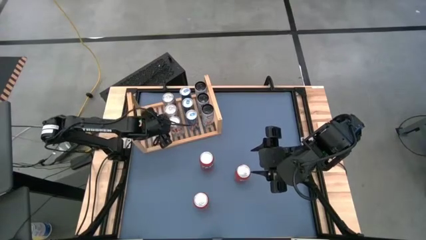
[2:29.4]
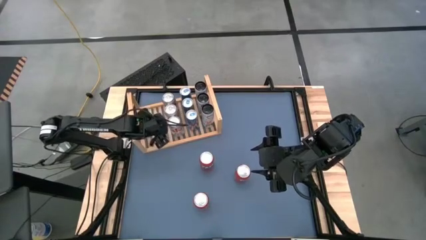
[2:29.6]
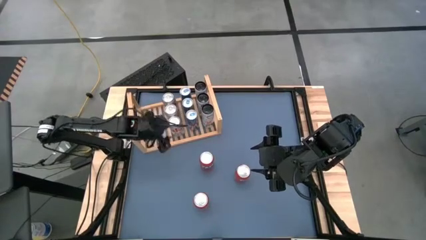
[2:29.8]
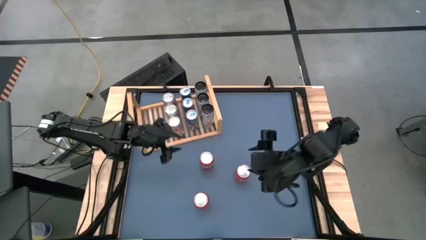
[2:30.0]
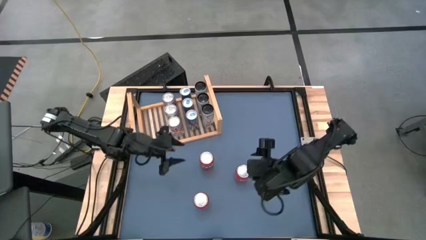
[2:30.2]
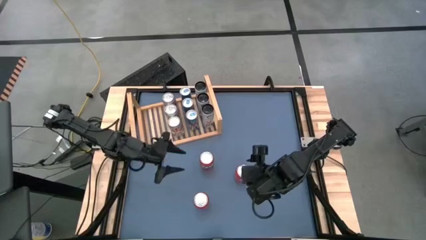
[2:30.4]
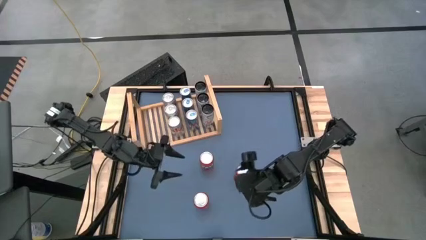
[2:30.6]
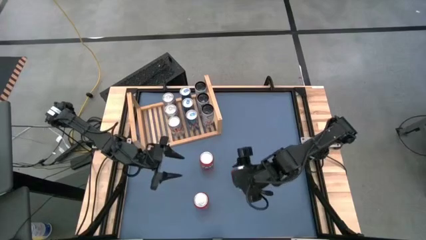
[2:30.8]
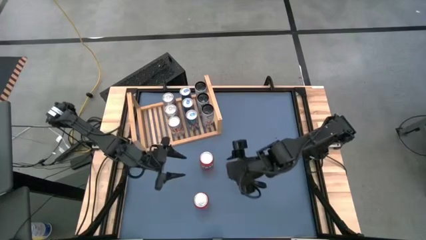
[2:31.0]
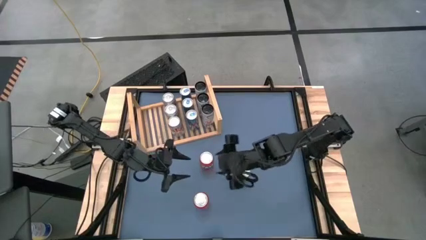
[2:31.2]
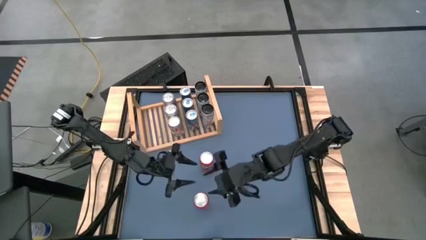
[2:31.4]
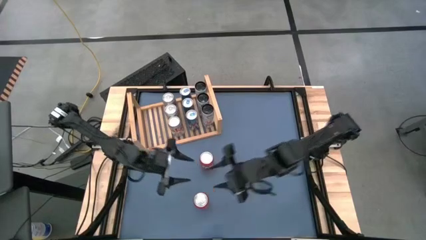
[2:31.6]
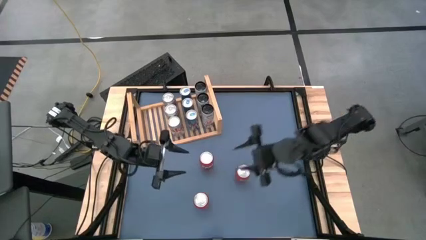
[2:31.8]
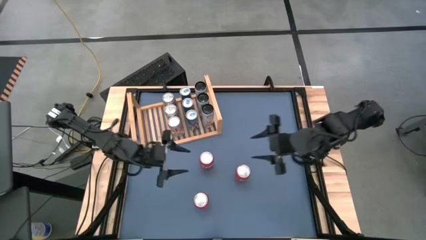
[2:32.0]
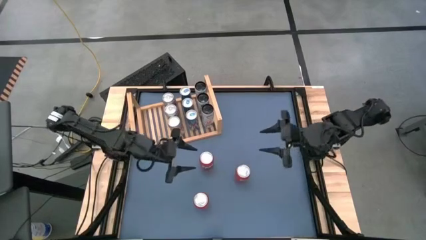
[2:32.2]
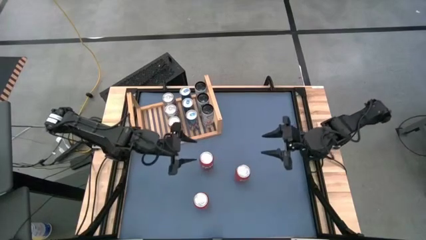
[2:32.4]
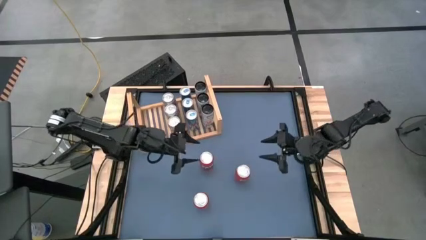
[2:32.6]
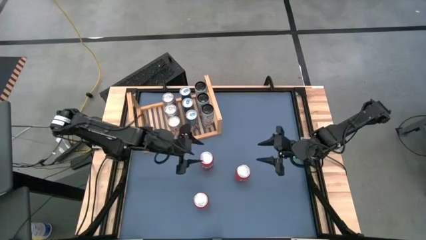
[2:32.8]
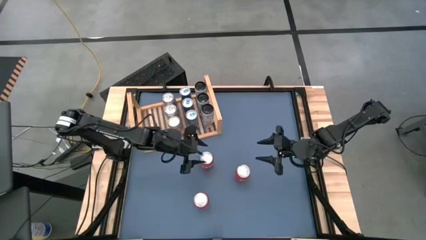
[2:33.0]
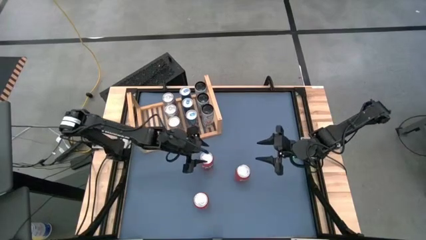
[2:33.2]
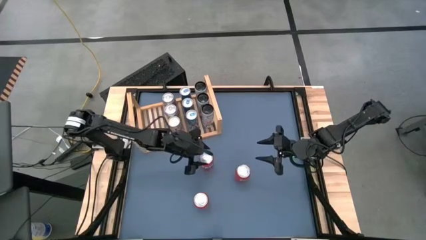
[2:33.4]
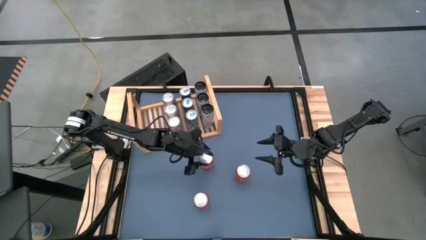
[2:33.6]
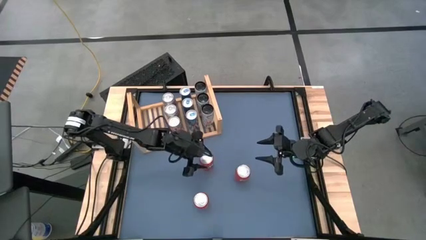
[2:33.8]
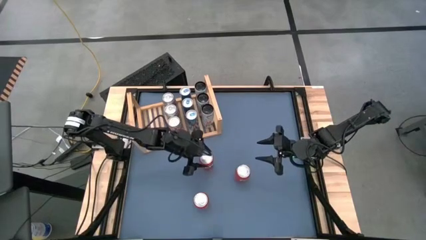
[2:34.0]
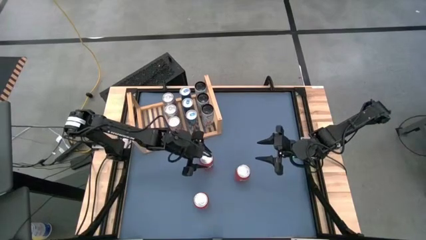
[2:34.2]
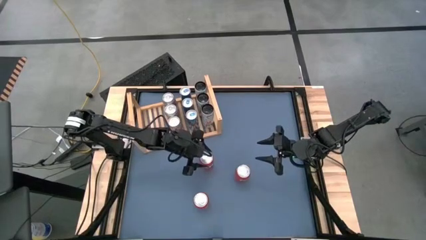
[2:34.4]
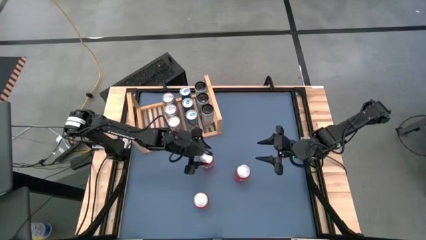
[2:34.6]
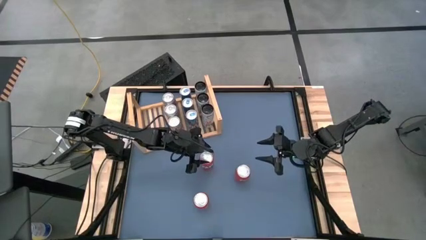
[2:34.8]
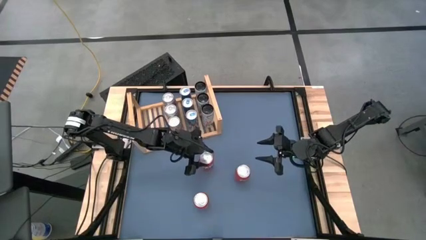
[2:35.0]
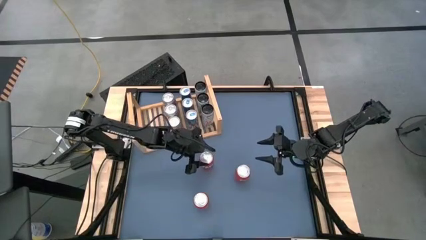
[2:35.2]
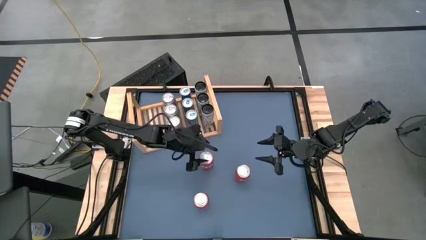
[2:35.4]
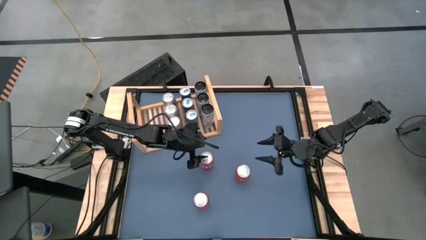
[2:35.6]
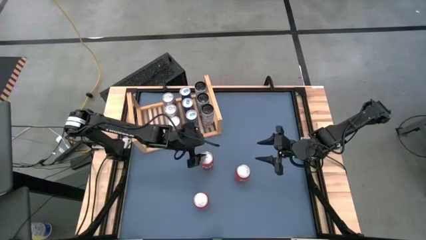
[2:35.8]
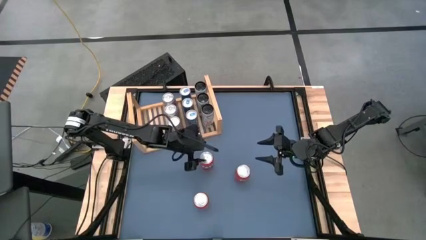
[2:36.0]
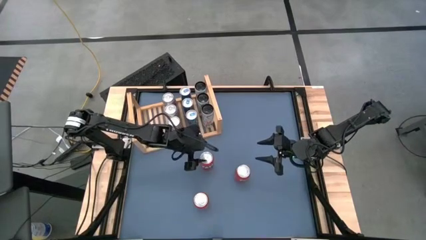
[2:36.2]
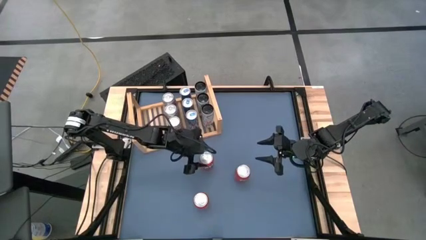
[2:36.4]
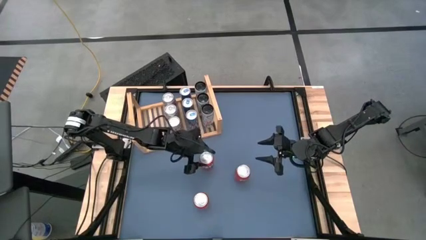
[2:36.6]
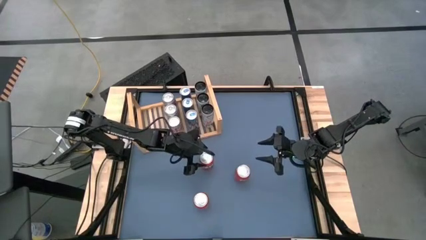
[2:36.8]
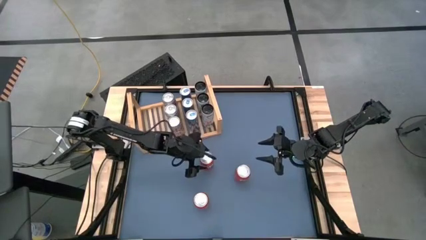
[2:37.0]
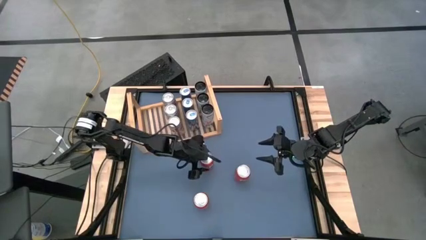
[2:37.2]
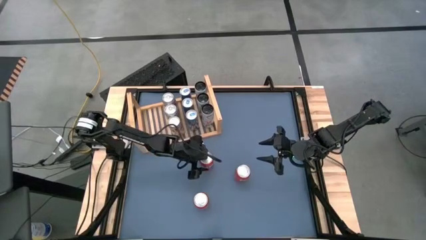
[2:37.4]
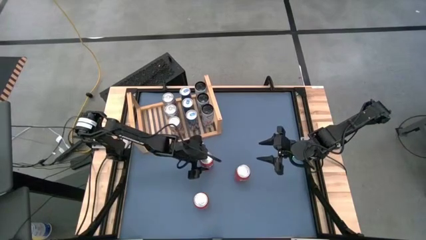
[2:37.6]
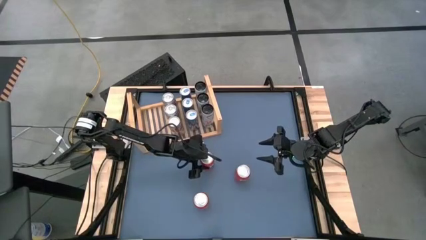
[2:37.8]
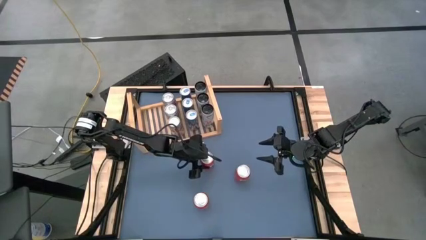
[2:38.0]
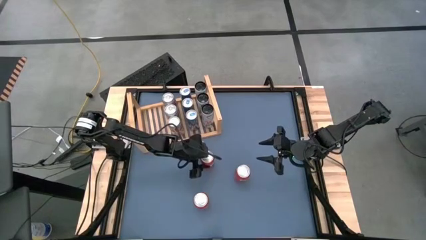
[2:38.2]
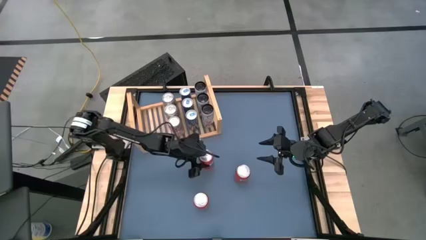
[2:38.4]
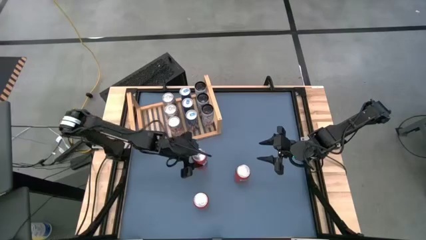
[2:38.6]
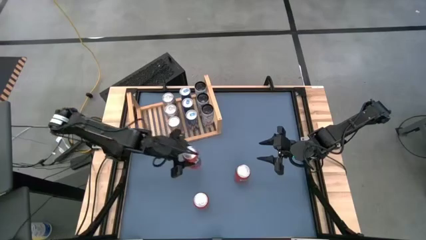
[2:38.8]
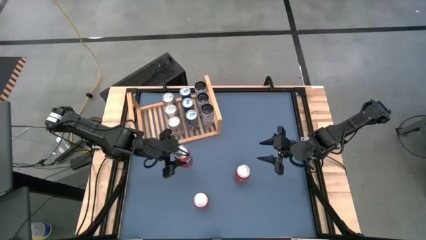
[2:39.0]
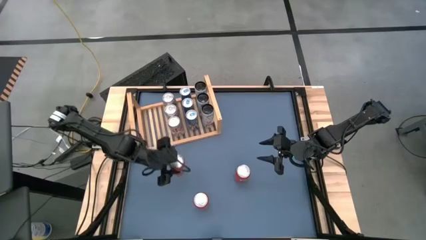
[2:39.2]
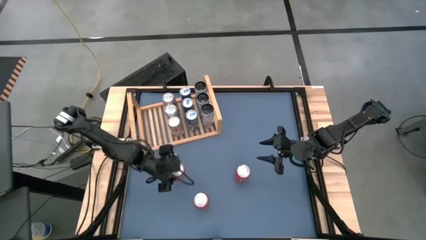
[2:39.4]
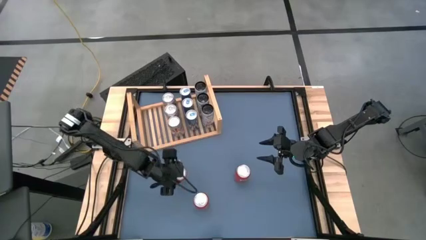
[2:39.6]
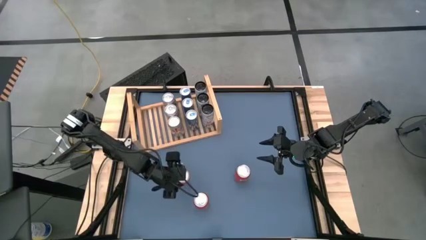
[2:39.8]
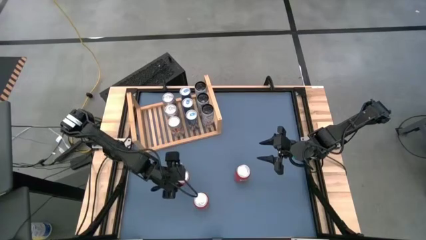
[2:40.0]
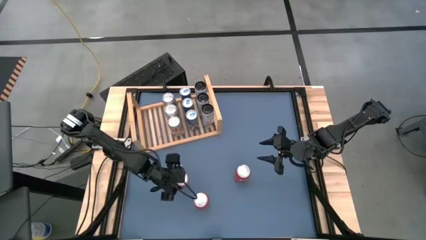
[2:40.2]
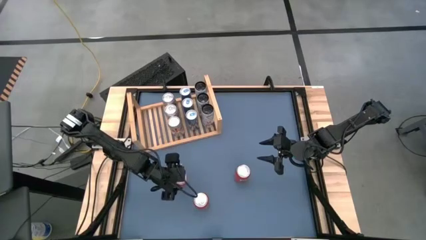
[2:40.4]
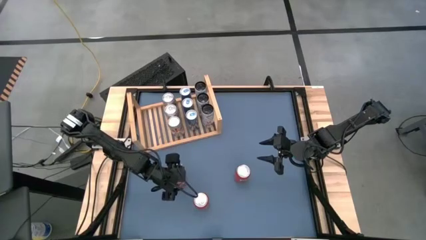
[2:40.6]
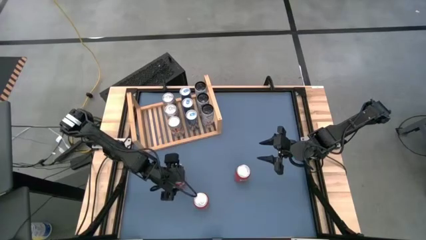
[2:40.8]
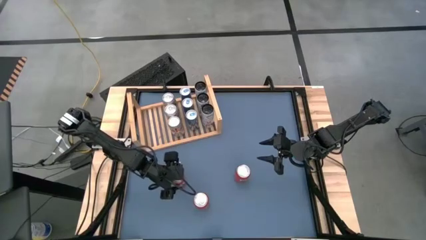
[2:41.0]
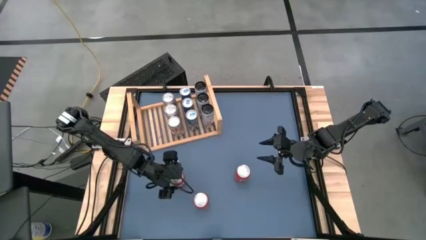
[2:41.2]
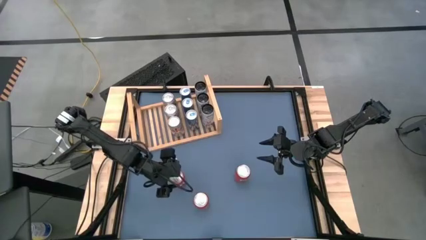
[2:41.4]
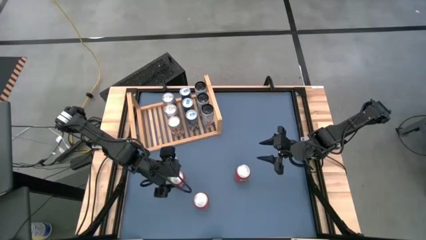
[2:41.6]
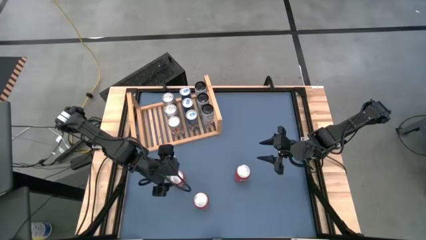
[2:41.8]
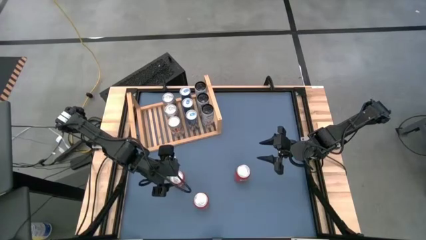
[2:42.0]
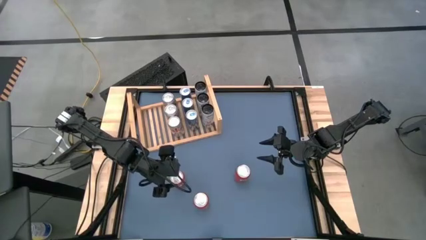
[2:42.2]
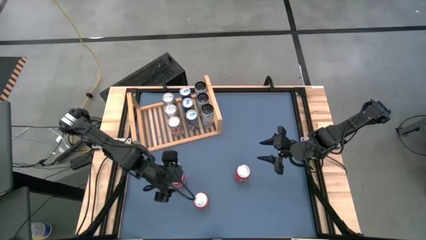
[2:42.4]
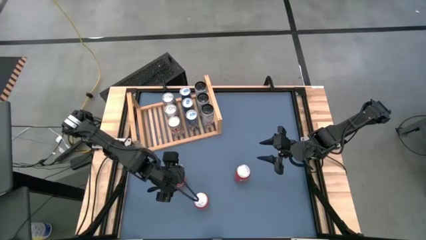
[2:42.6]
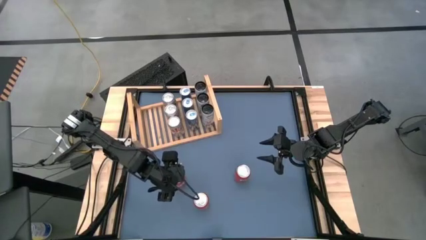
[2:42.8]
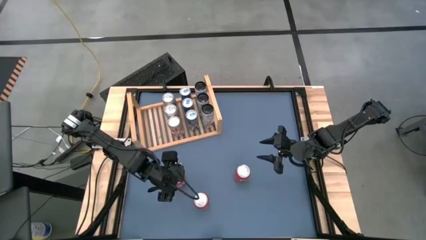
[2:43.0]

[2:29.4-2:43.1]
Task: Place canned beverage on shelf
Put the top left red soda can on the shelf

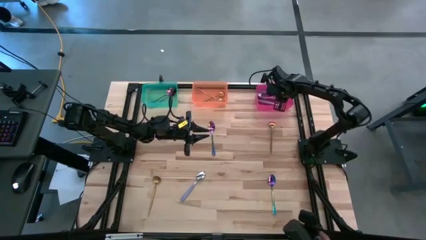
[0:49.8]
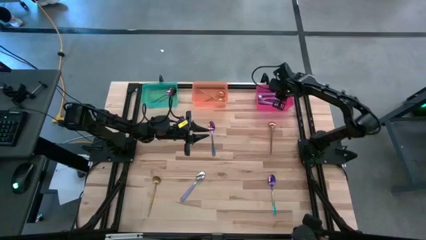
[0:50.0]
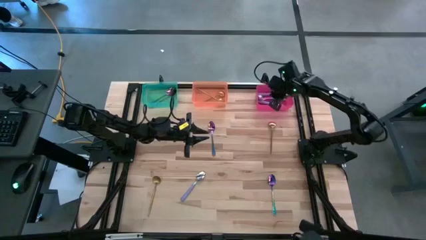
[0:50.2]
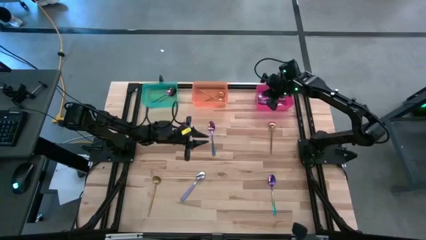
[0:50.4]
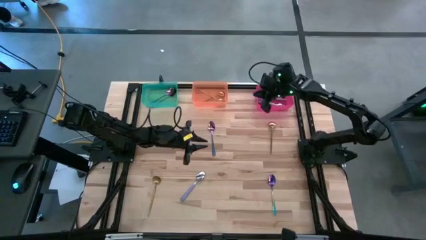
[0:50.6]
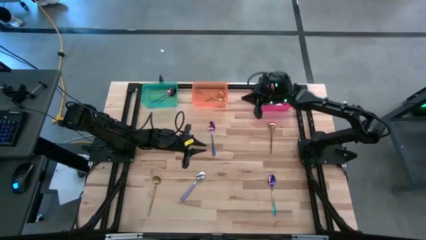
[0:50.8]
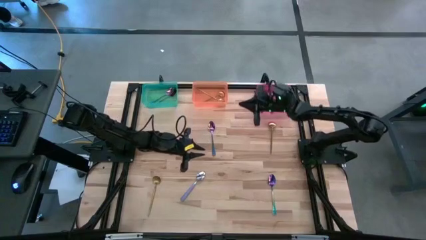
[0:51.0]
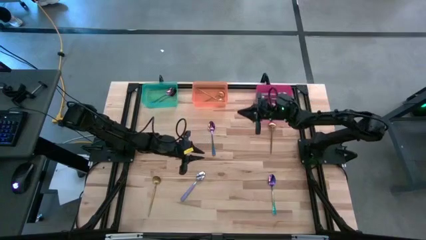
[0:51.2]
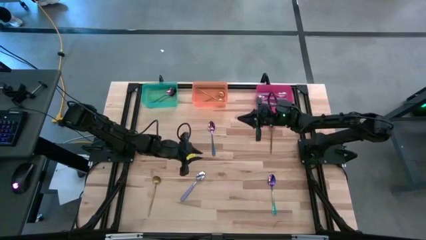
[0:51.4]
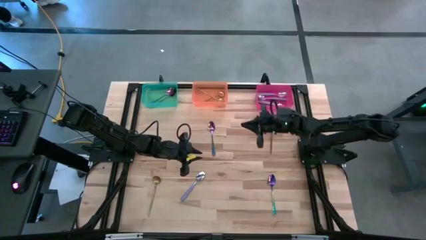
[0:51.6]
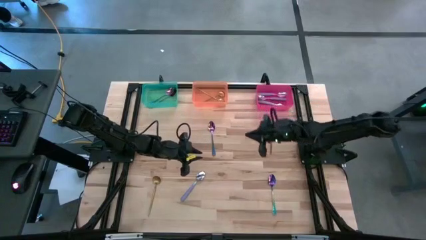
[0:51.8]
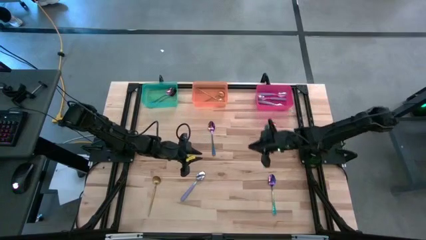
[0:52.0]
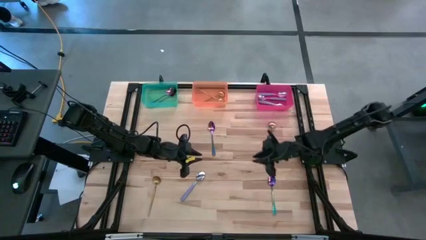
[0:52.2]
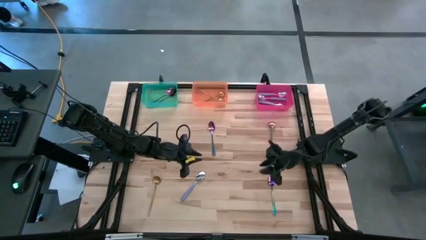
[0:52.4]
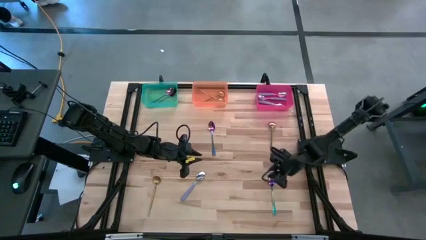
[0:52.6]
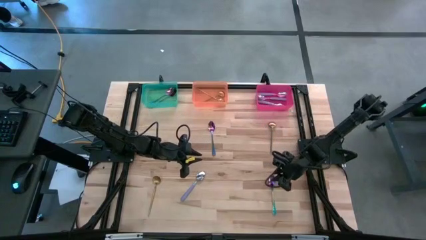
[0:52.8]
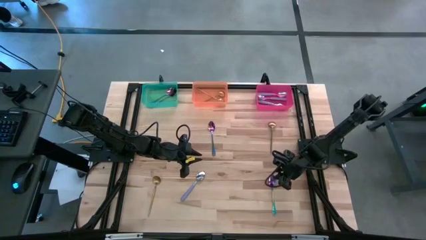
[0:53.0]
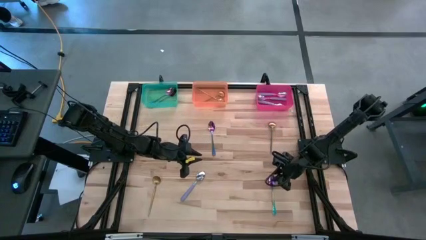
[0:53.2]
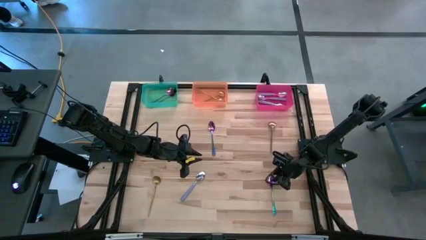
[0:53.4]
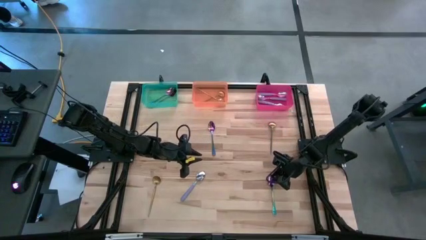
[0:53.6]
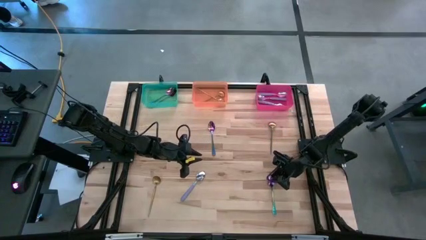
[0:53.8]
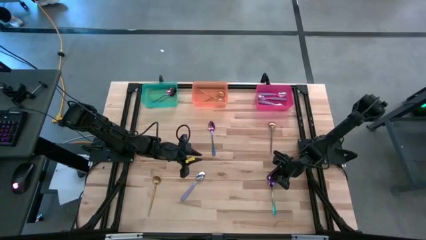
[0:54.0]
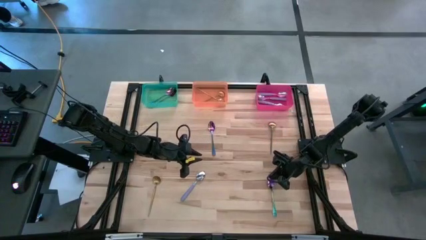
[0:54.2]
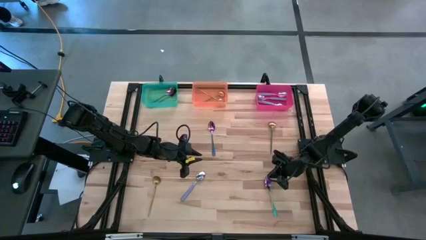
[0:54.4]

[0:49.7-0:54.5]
Task: Sort silverware by color (type)
Put the blue spoon into the orange bin
